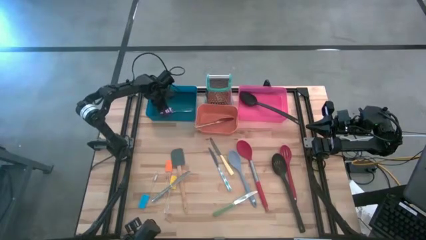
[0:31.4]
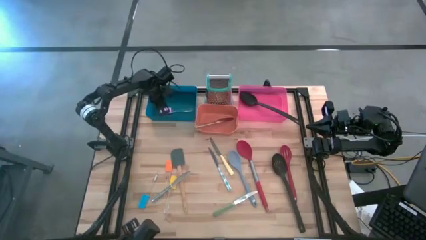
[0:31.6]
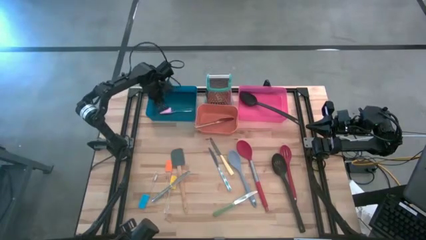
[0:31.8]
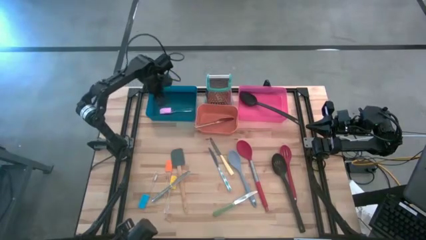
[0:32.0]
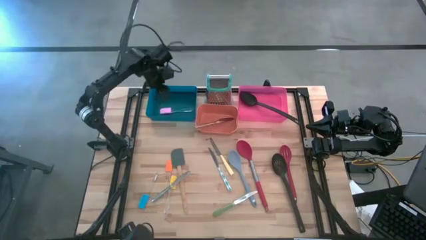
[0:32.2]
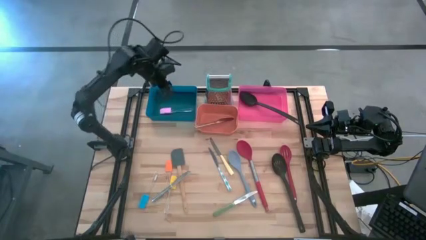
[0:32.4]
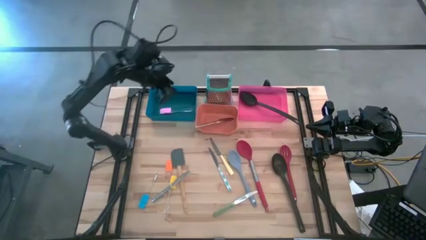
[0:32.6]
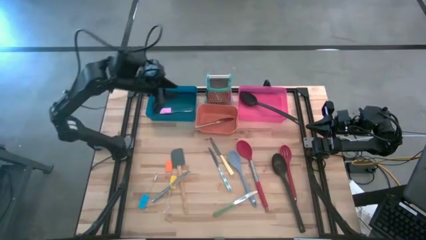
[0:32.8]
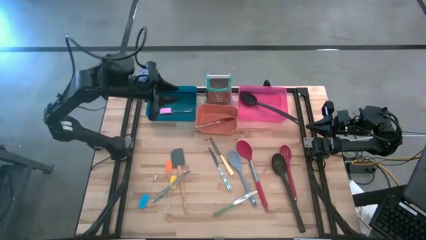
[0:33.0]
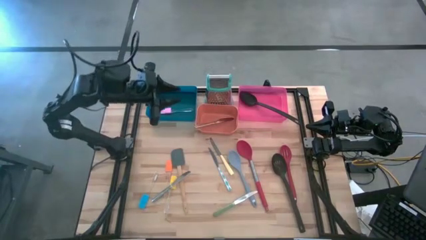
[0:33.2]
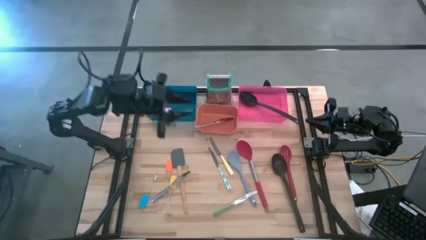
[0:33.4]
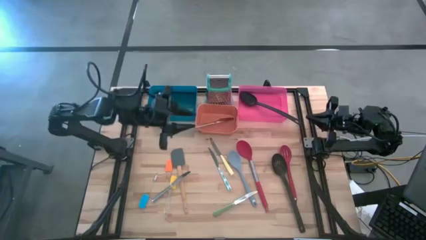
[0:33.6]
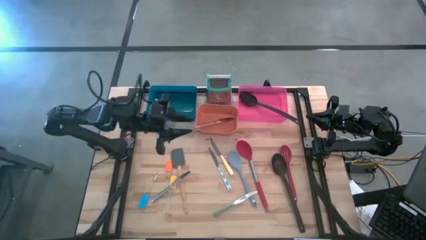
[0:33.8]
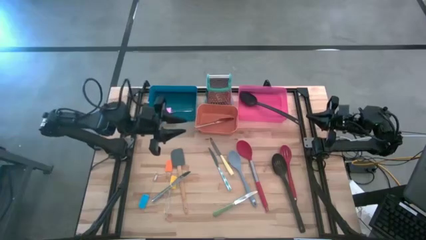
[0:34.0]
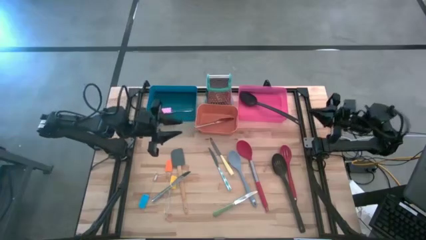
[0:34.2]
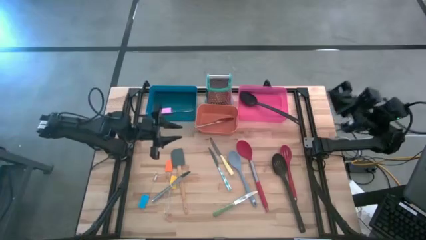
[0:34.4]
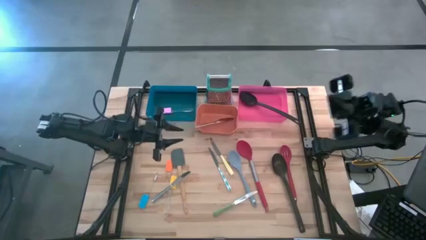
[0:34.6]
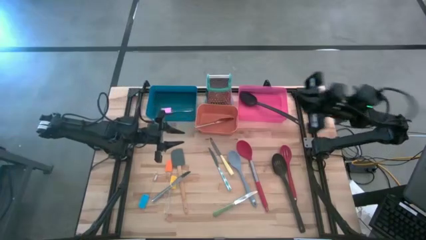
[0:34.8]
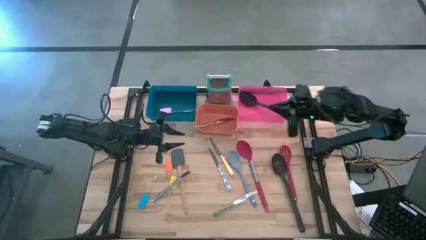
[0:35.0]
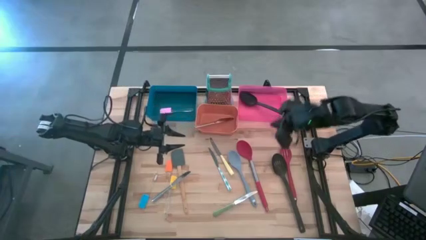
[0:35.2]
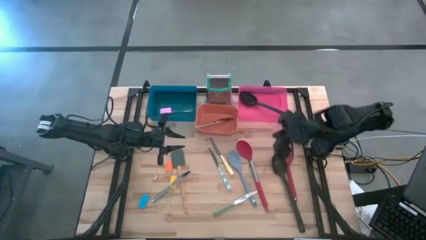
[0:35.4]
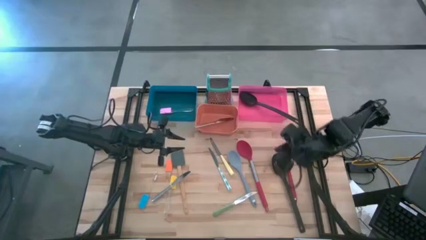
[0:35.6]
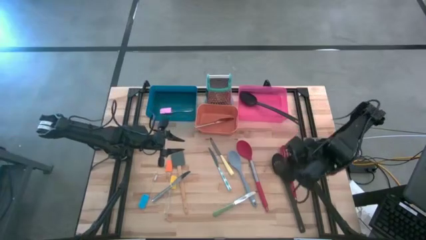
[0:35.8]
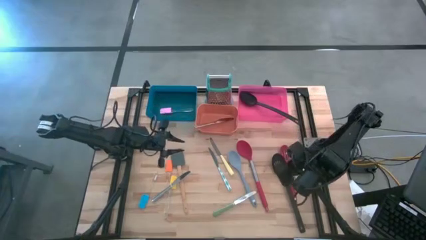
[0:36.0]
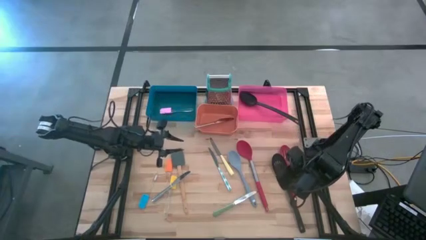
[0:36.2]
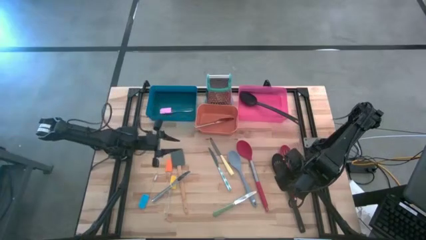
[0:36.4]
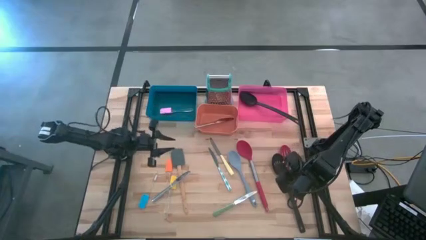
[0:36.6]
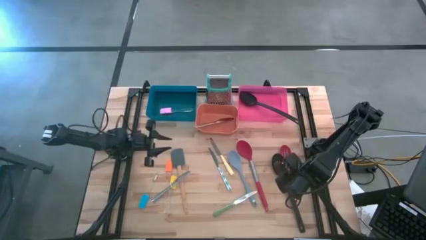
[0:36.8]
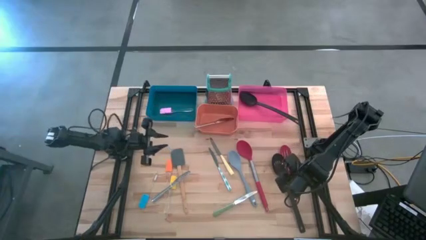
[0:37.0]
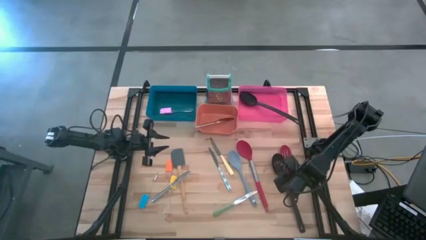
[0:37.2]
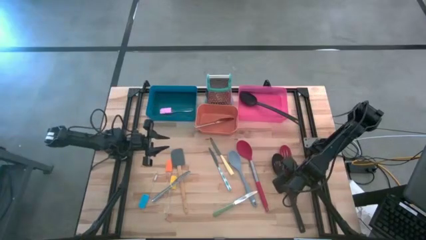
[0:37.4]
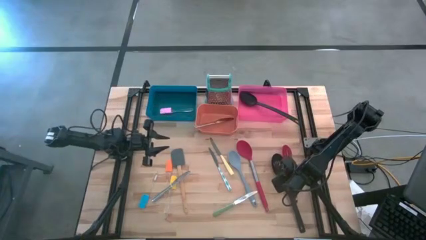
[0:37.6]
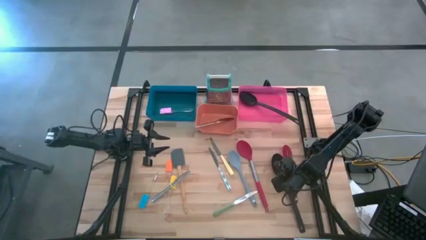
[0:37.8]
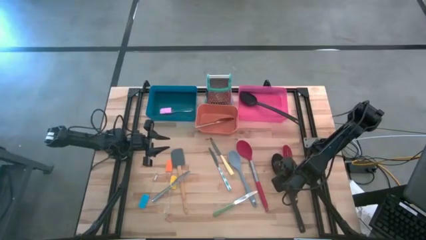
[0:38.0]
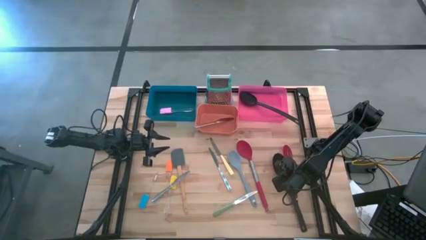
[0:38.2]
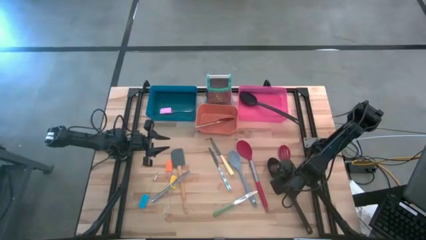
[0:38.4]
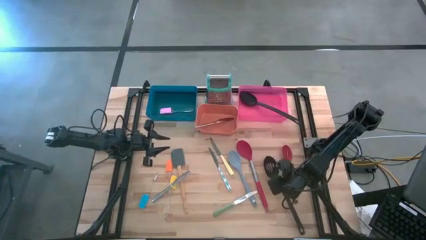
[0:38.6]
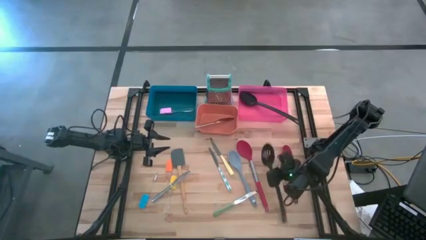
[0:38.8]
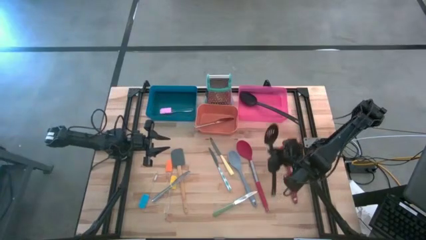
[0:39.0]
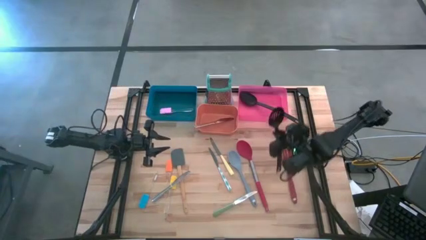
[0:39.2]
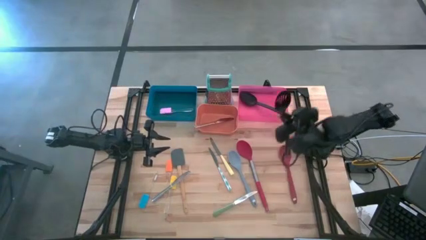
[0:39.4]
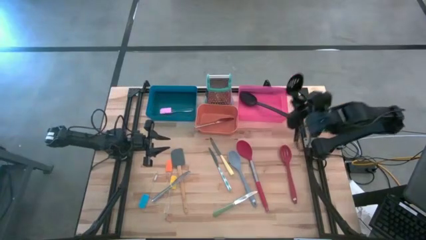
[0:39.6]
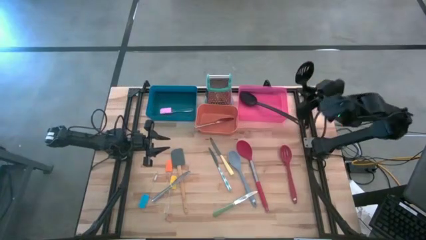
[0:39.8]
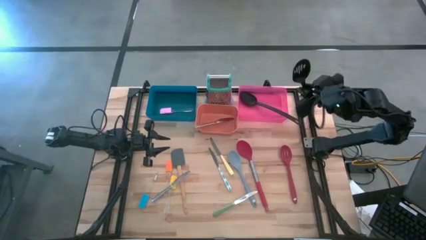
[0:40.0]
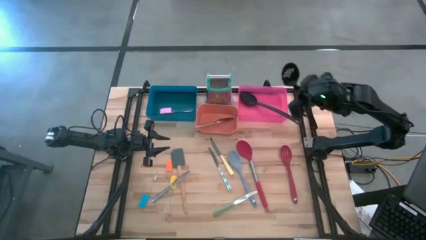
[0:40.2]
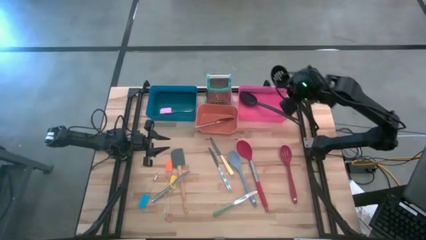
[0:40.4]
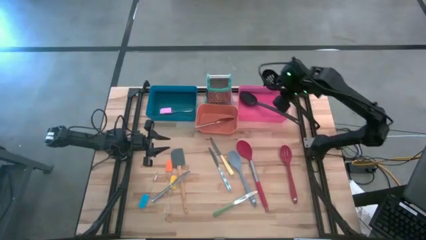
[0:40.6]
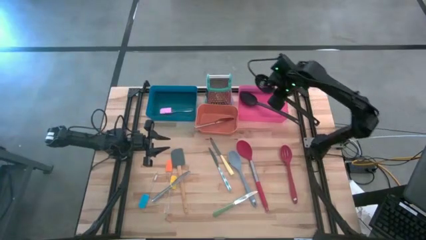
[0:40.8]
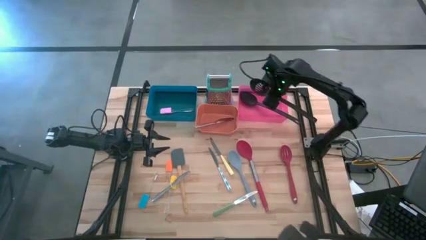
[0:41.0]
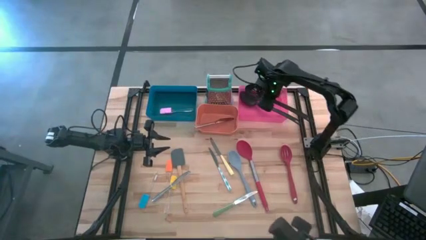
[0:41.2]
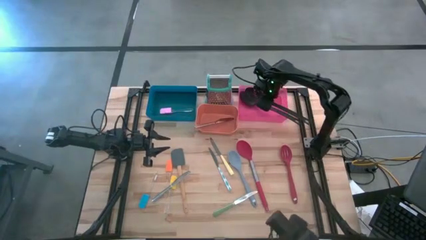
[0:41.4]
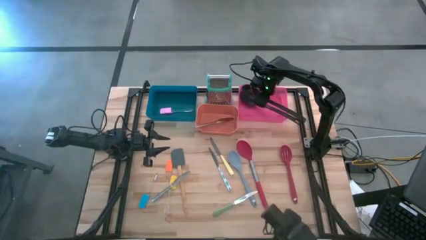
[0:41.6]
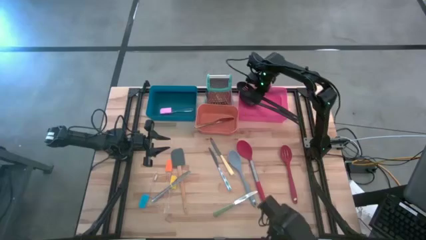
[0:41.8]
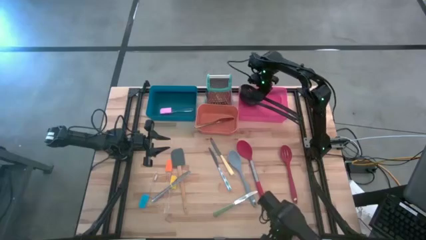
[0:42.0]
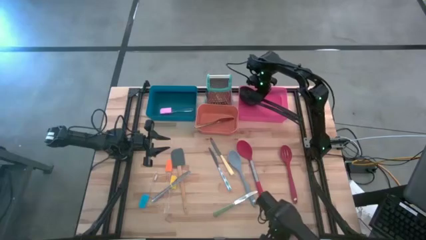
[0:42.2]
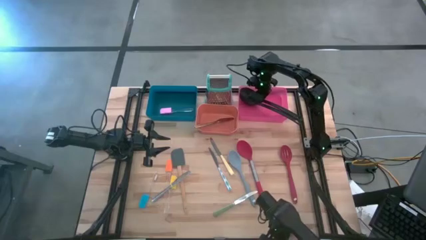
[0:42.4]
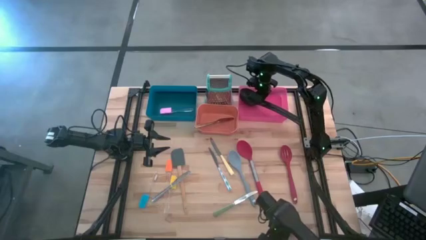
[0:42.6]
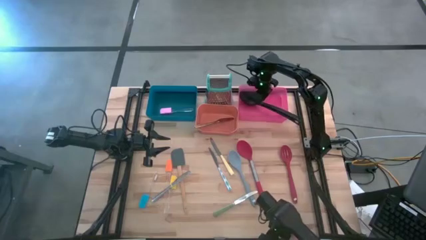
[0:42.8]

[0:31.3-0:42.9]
Task: Pick & Place Kitchen Items
Put the black slotted ladle scoop into the pink bin

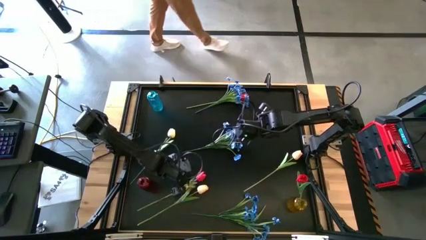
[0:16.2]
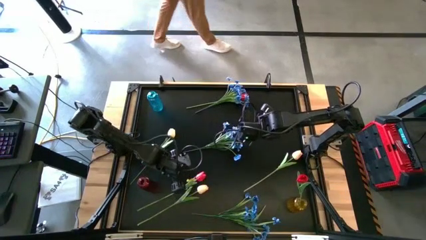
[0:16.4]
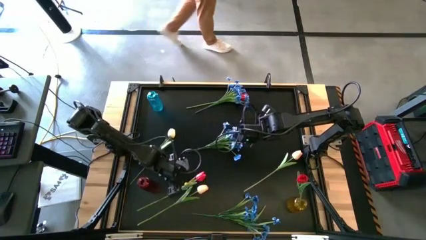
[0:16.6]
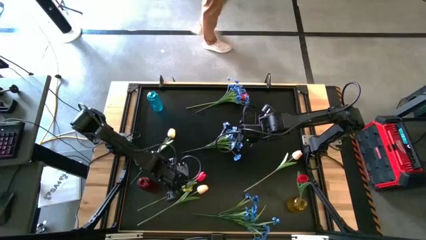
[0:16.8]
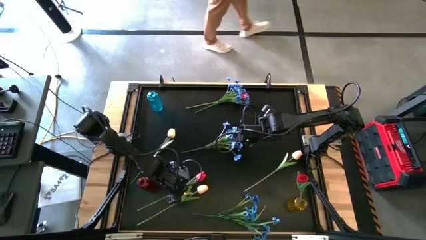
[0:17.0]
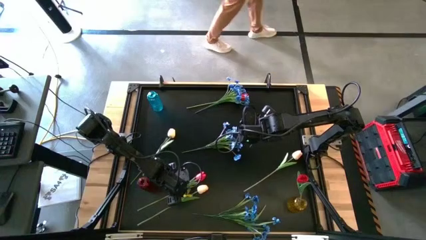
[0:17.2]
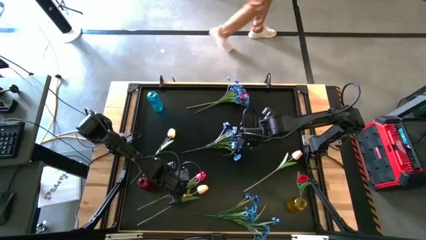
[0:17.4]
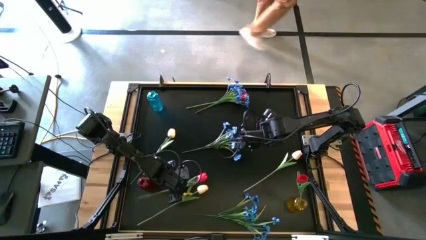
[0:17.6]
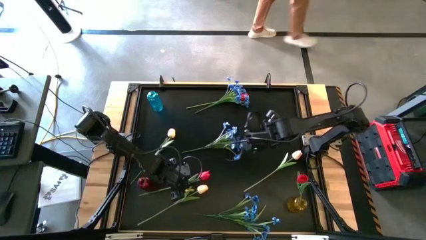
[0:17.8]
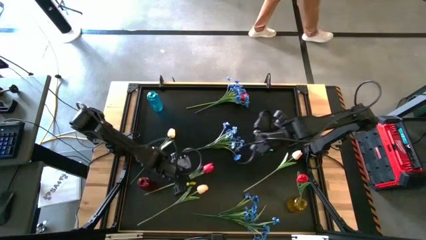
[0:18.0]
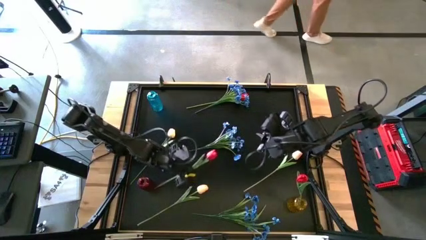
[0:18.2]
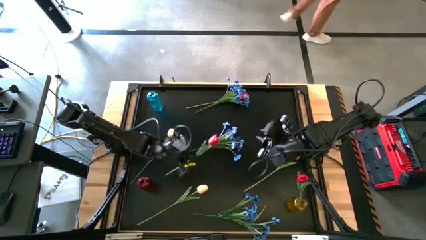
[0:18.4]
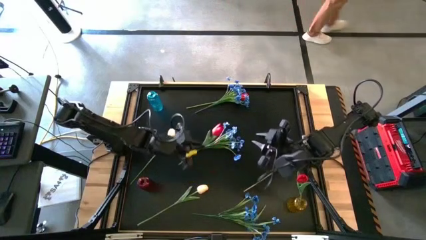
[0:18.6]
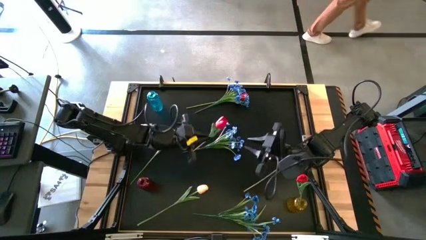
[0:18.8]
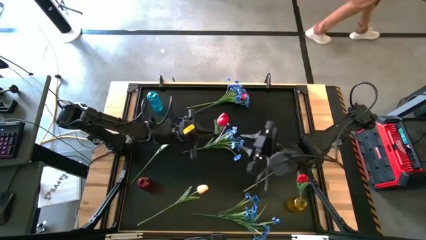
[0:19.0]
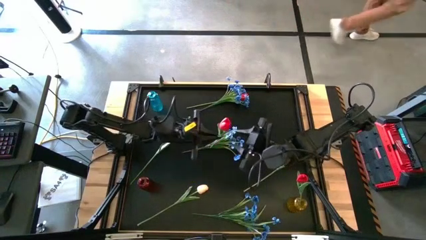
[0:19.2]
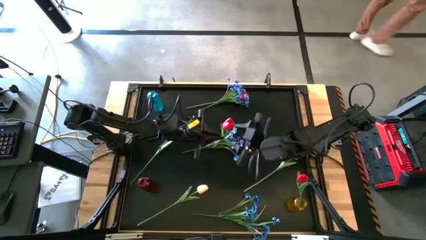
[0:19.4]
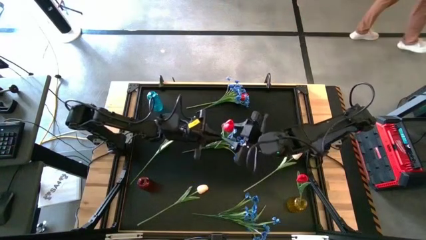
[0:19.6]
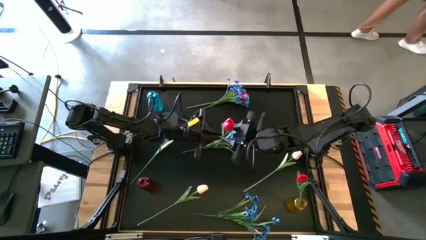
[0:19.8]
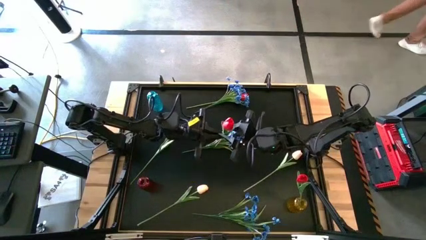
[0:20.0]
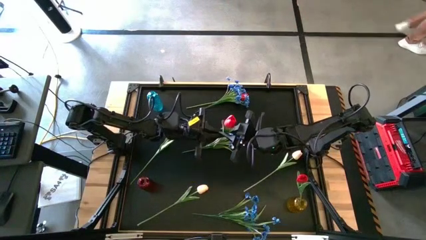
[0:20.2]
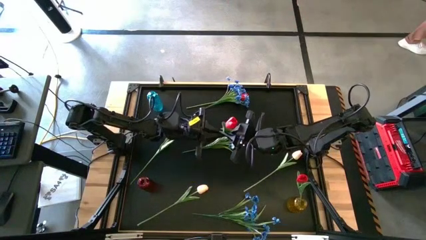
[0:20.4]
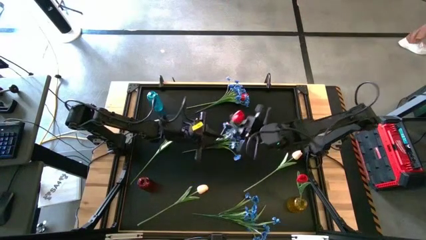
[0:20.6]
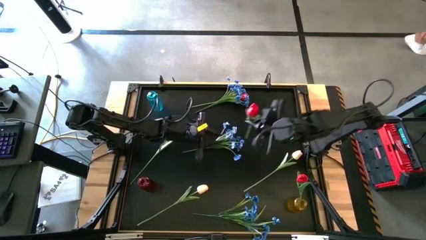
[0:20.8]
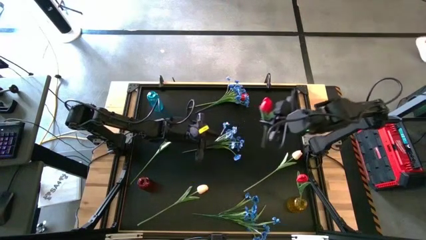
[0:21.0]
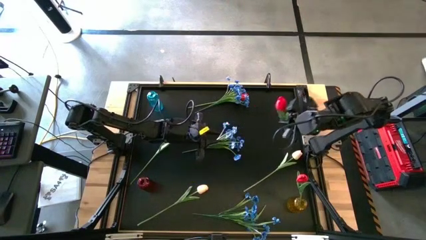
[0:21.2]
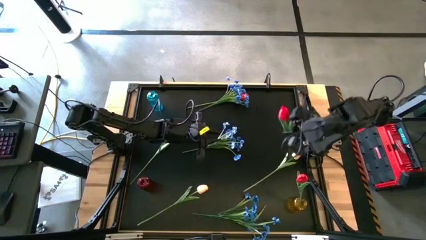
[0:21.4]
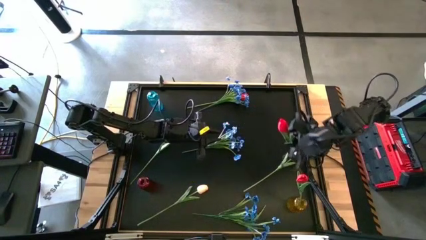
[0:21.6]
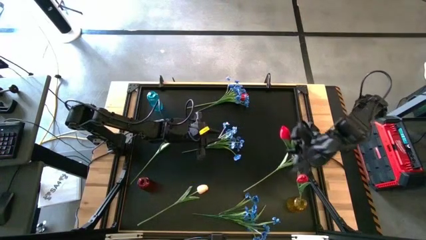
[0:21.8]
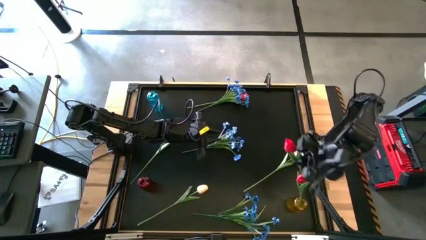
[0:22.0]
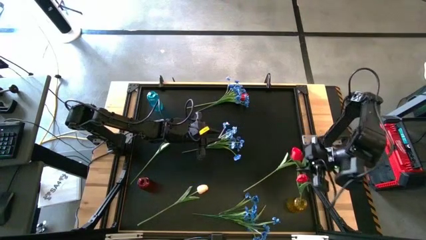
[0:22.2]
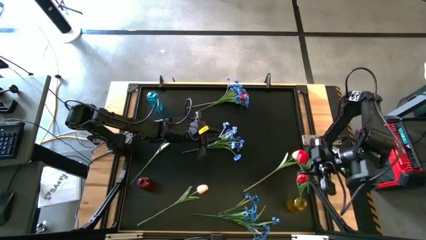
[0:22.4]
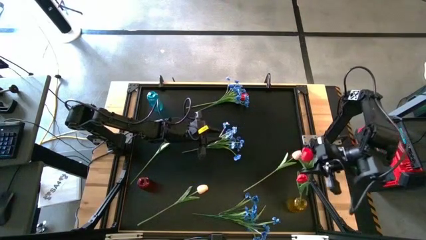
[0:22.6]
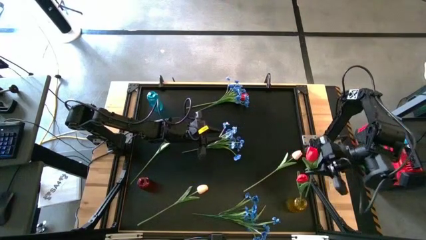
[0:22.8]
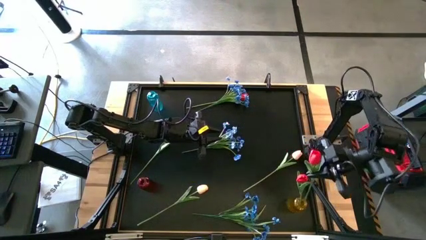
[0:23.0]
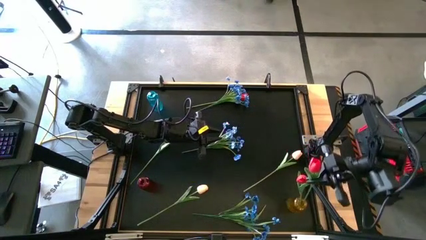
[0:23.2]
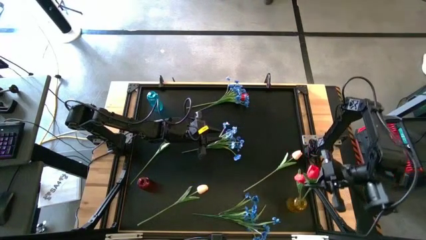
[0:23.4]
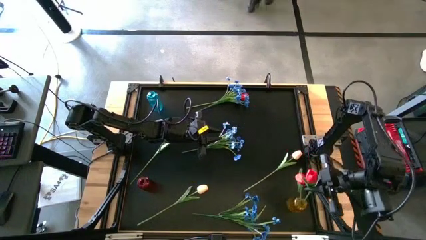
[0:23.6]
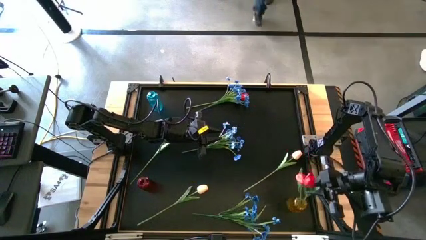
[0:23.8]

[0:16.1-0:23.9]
Task: Sort flowers into vase by color
Put the bottom red flower into the yellow vase
